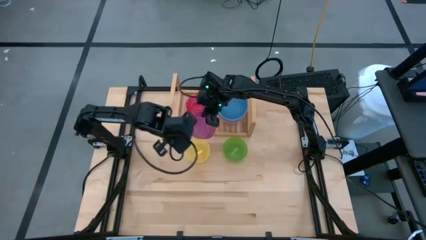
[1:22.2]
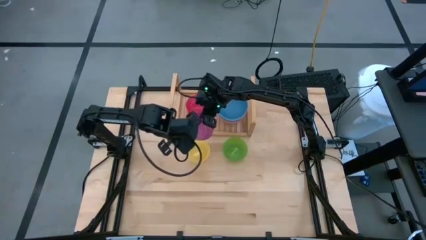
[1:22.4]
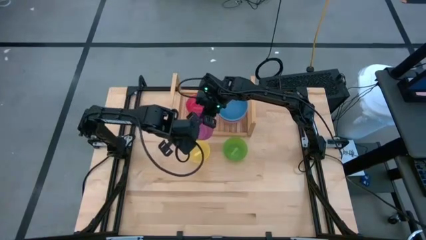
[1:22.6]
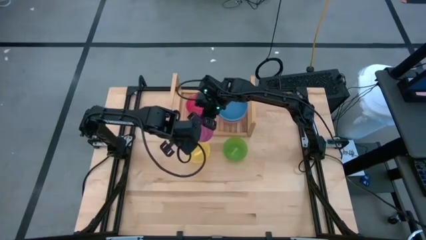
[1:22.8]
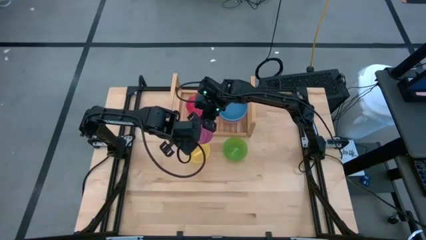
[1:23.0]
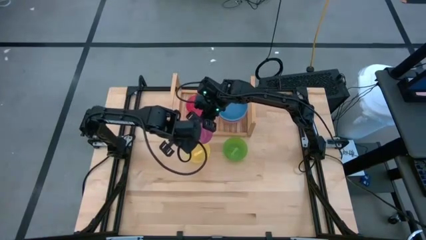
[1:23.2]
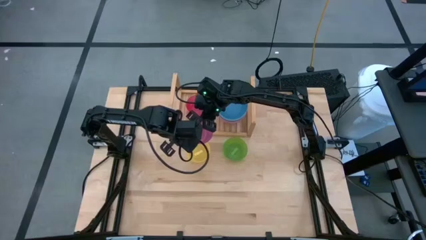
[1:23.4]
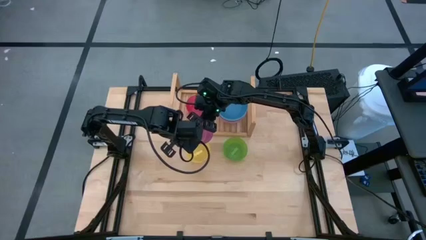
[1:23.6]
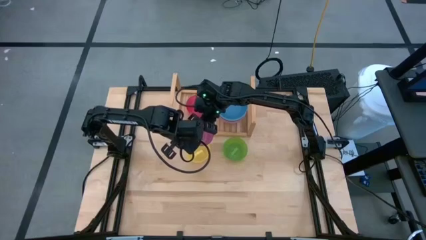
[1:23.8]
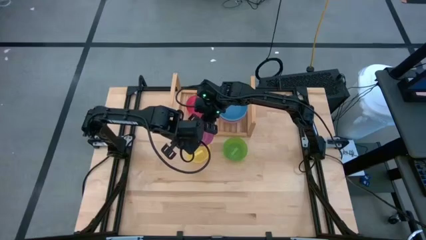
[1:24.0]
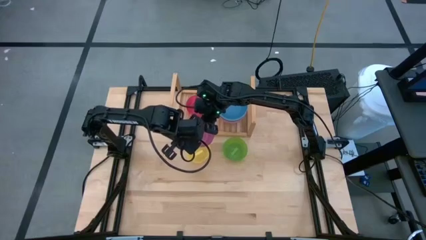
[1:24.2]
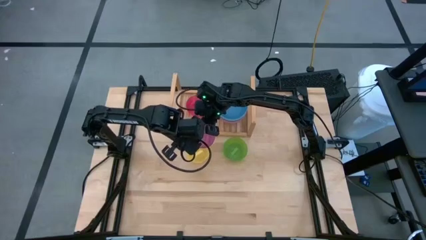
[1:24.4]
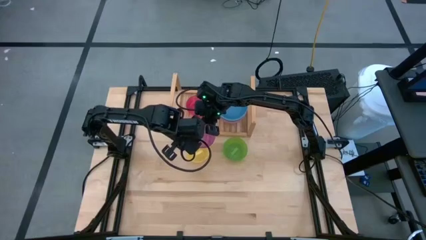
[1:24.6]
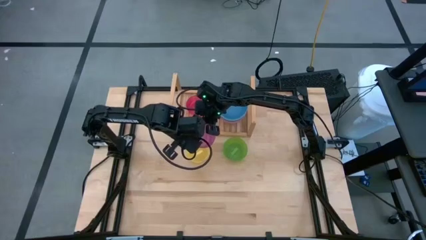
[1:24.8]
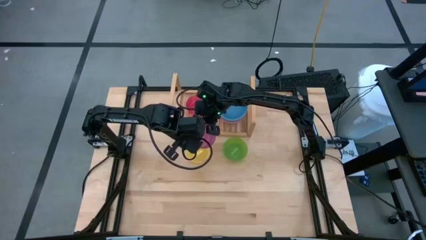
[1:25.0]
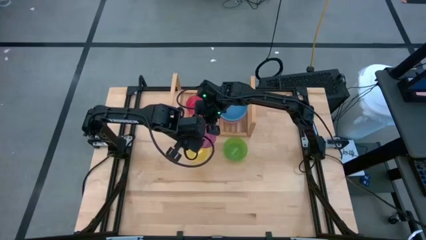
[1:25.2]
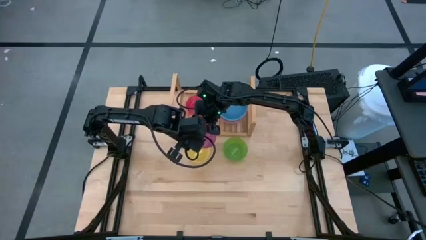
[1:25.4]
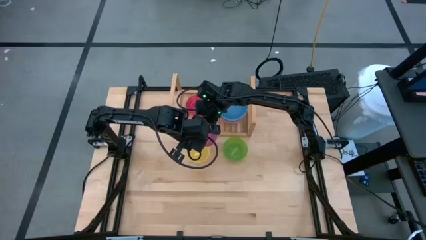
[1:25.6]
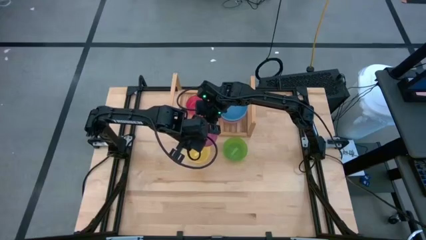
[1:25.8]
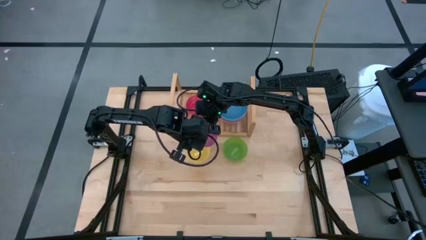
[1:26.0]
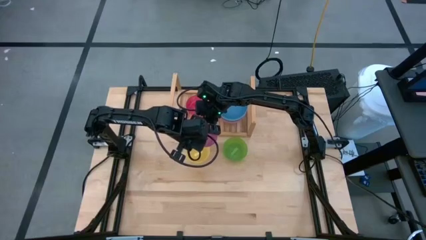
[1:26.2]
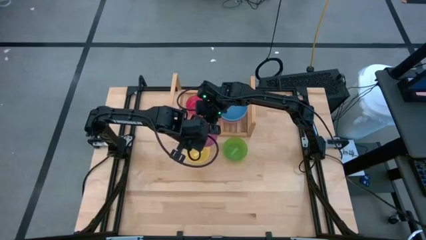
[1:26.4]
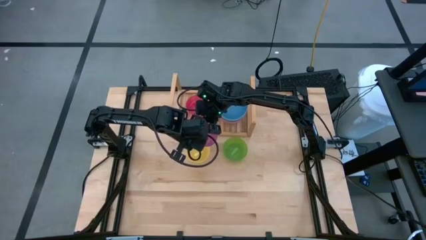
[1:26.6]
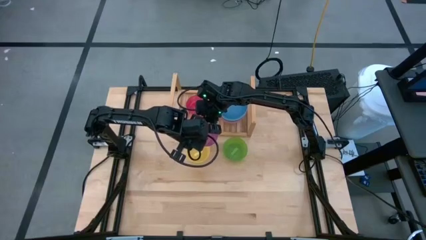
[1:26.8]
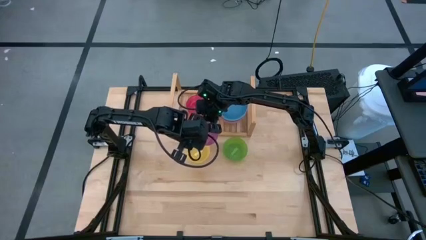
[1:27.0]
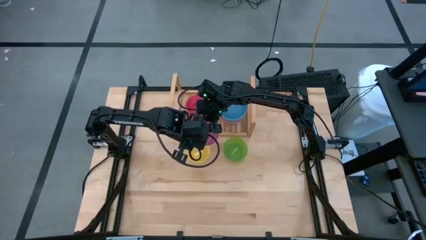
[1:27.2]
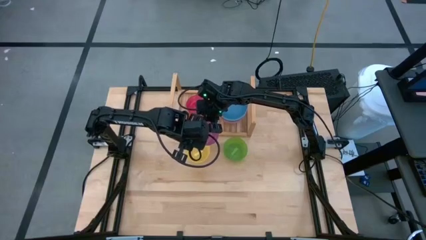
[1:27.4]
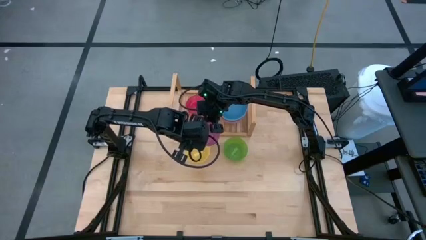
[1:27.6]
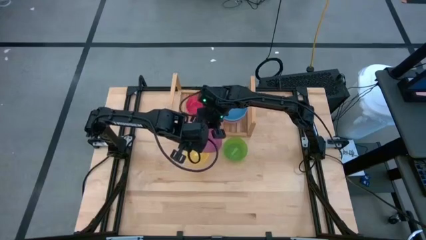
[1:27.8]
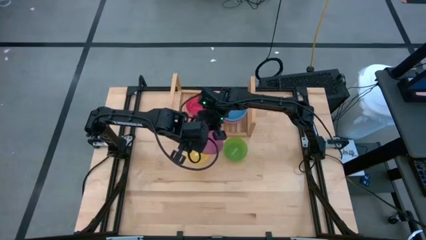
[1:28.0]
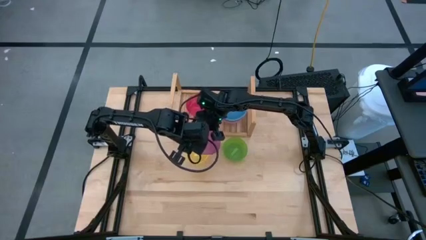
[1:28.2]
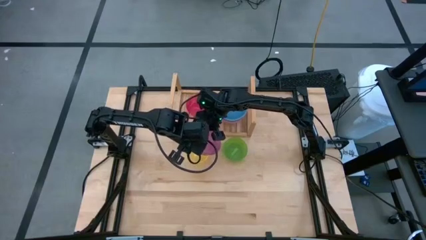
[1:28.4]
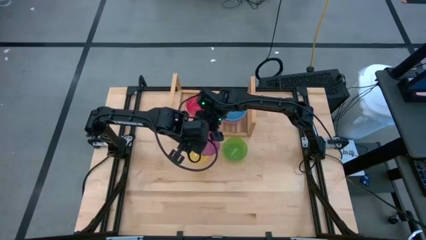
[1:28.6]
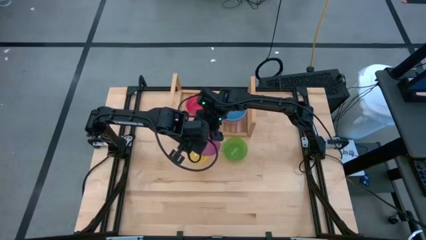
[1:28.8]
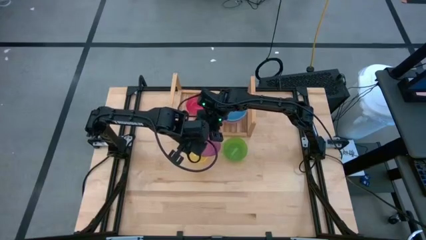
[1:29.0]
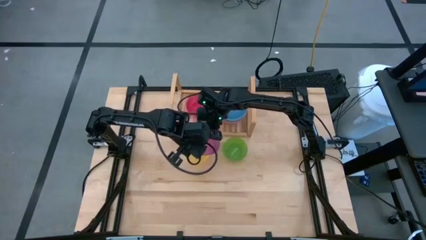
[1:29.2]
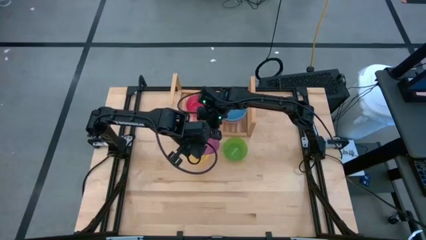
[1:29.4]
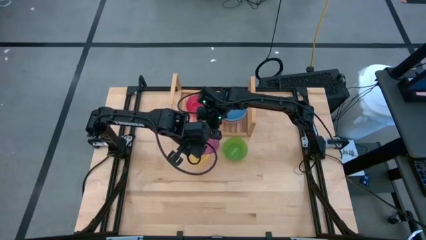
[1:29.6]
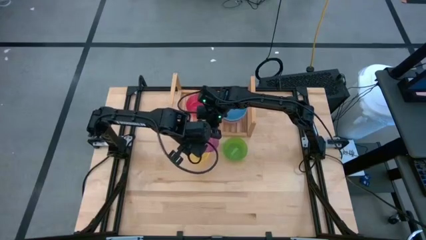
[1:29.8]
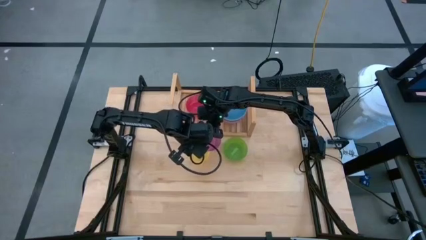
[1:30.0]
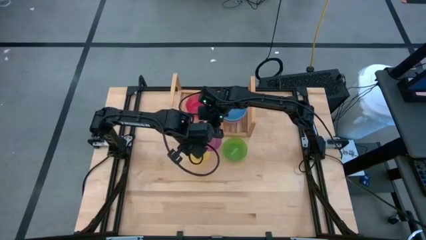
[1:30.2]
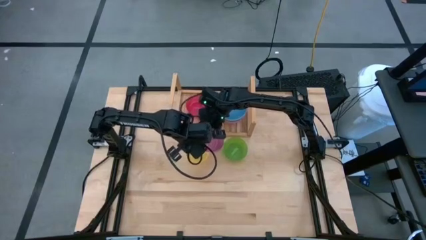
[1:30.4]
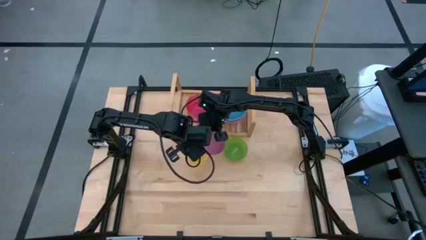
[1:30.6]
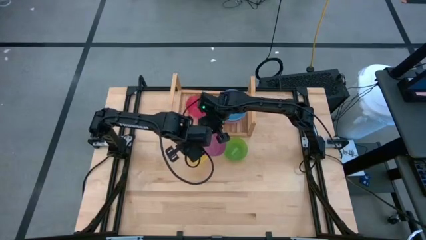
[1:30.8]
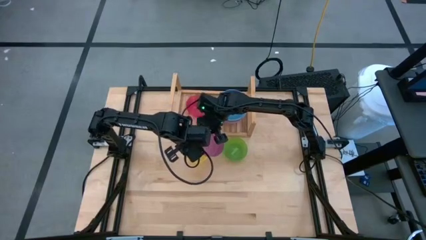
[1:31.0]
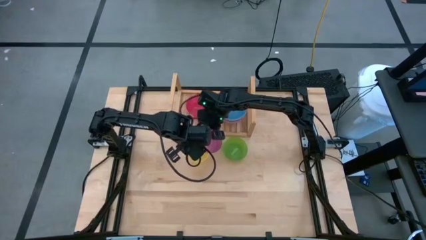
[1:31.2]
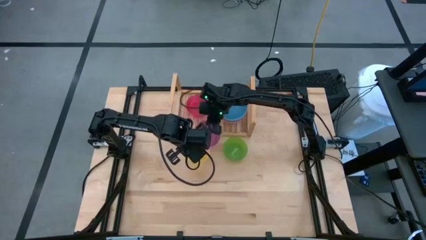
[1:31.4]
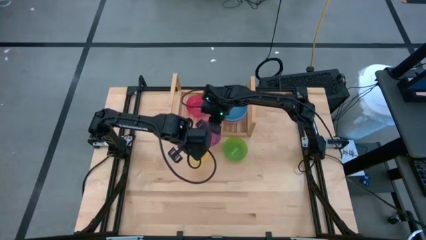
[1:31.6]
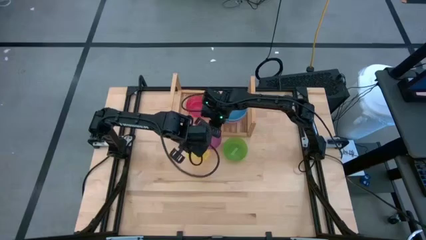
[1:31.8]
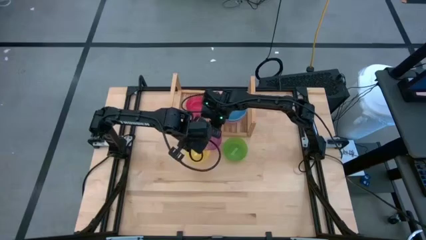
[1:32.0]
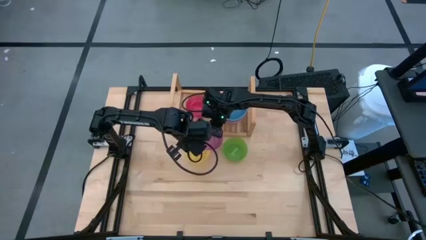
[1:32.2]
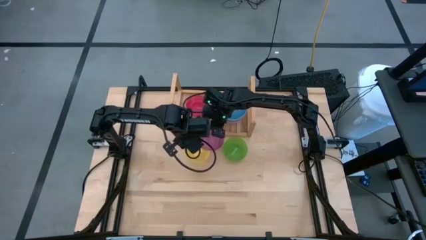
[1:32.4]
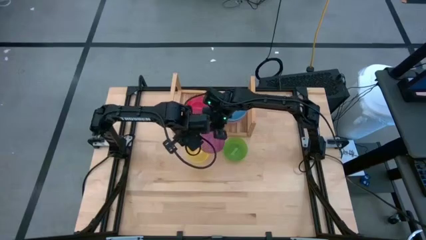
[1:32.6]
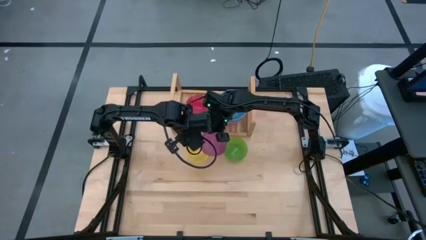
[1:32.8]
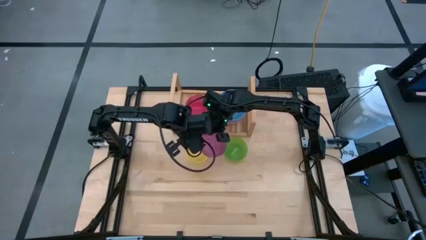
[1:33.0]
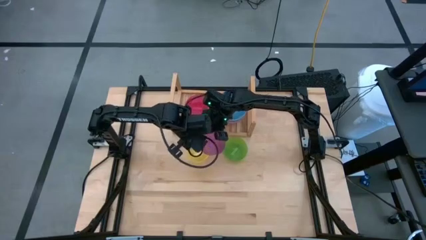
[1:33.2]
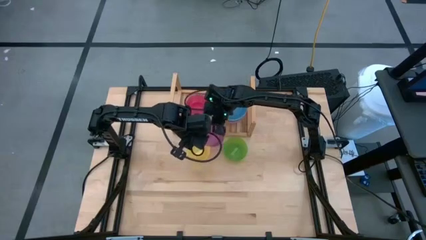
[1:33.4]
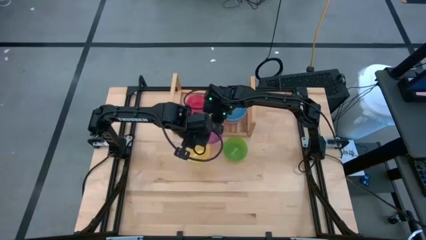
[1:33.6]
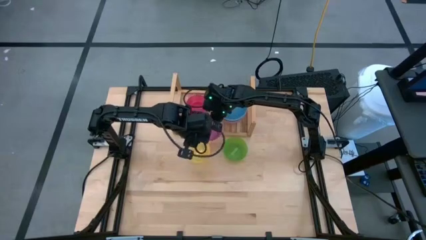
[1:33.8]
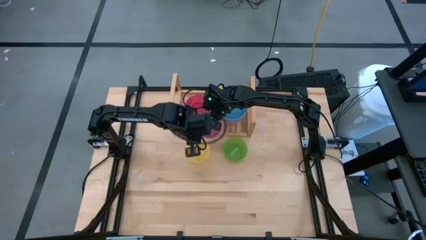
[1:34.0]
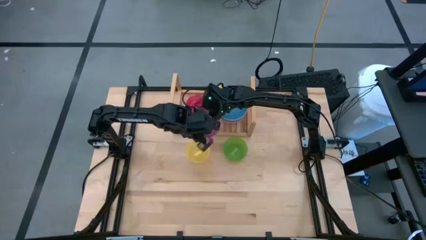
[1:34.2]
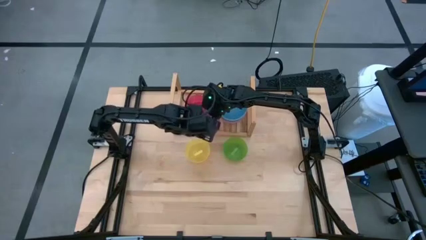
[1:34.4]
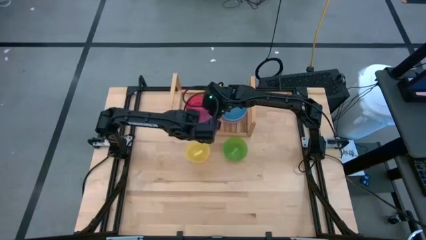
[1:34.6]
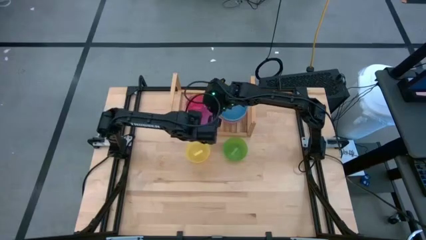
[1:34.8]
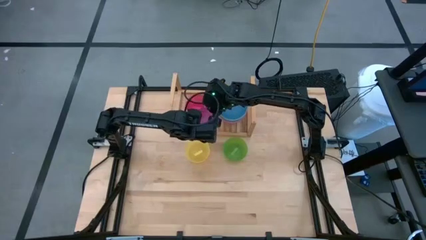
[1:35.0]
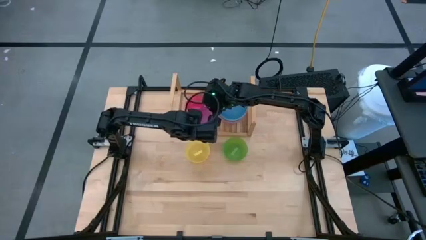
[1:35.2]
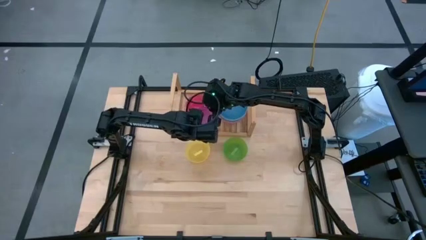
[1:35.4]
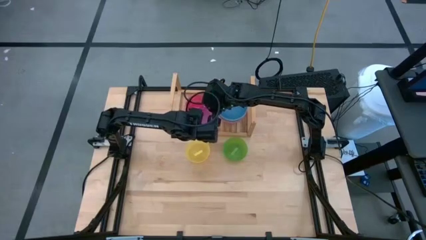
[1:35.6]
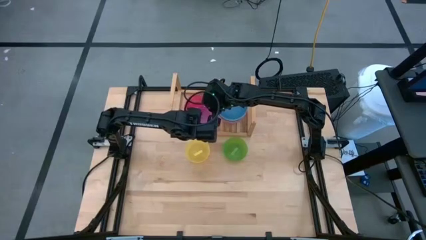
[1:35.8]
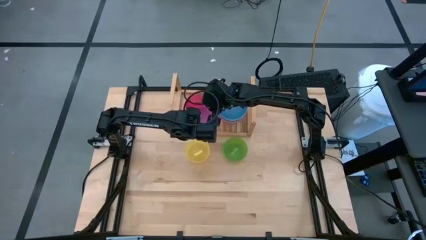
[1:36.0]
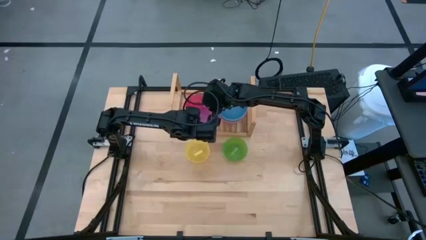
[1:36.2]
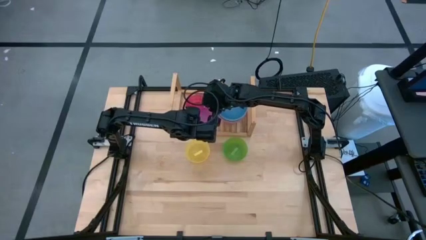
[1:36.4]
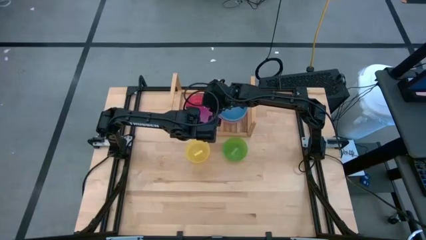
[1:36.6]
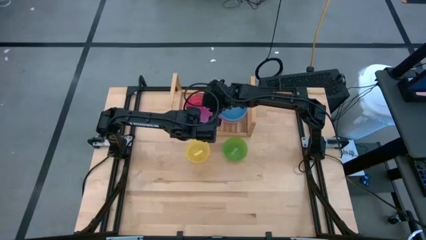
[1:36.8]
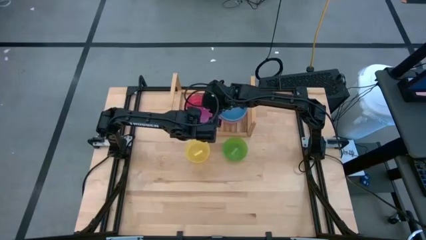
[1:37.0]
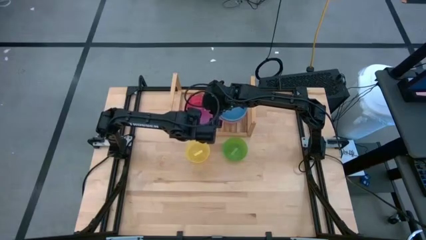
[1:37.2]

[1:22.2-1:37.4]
Task: Place and stack bowls onto a shelf
Stack the violet bowl into the red bowl on the shelf
